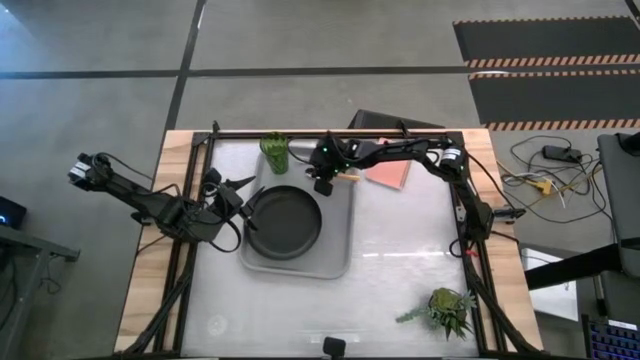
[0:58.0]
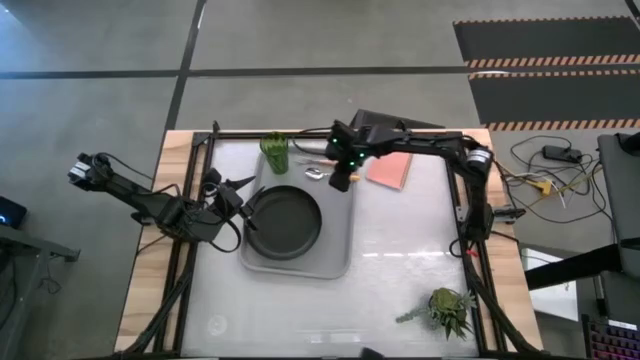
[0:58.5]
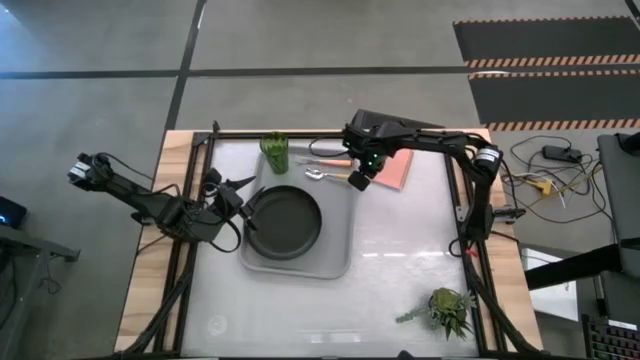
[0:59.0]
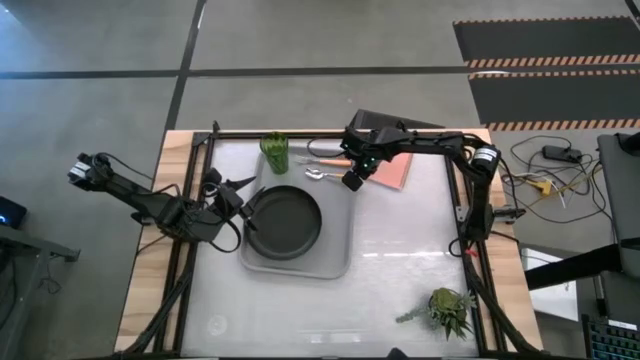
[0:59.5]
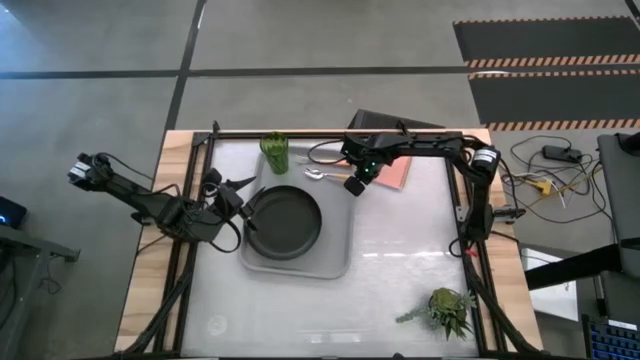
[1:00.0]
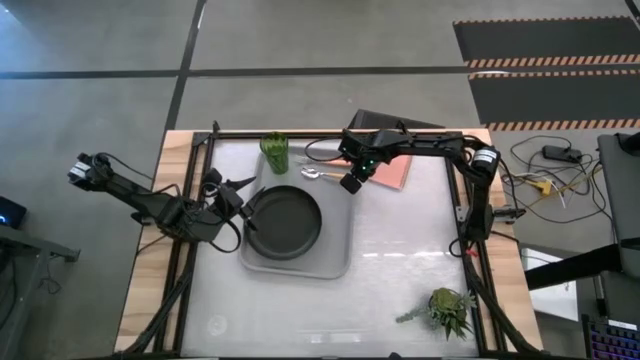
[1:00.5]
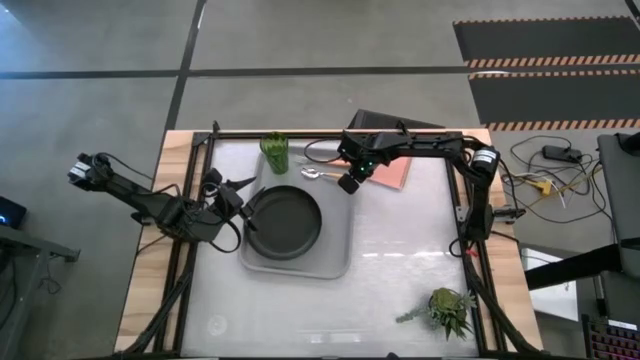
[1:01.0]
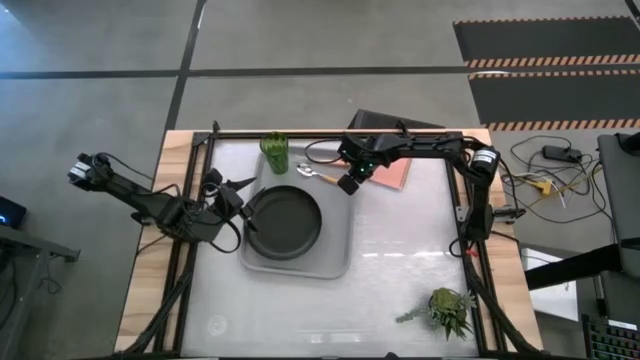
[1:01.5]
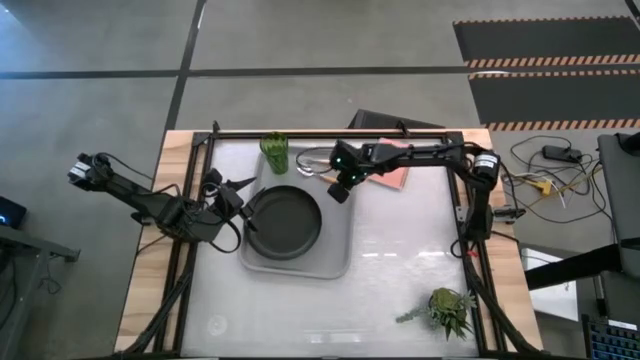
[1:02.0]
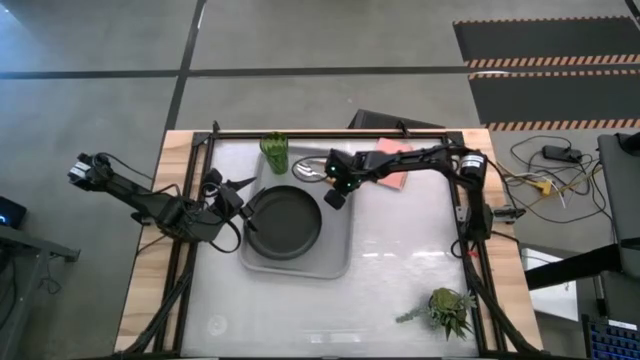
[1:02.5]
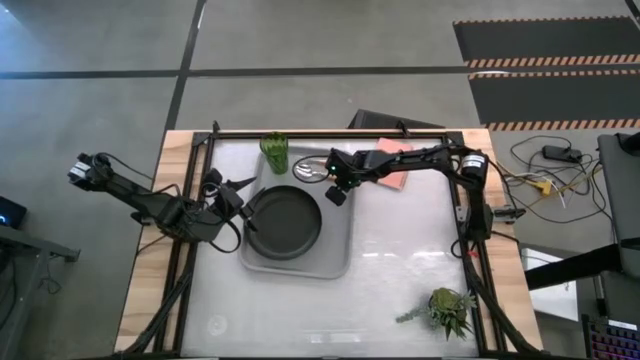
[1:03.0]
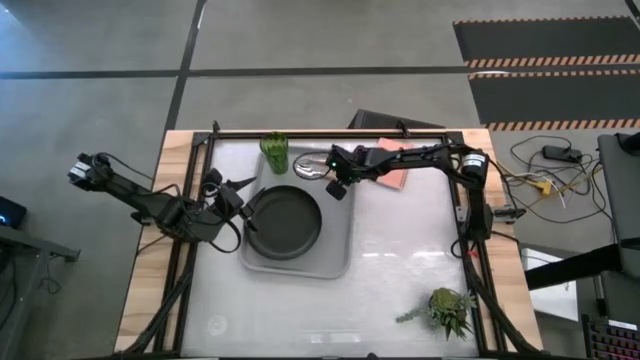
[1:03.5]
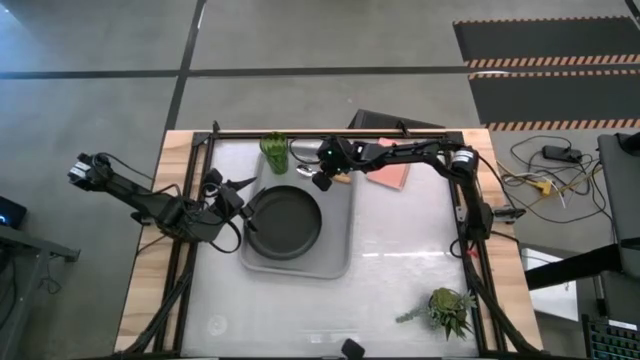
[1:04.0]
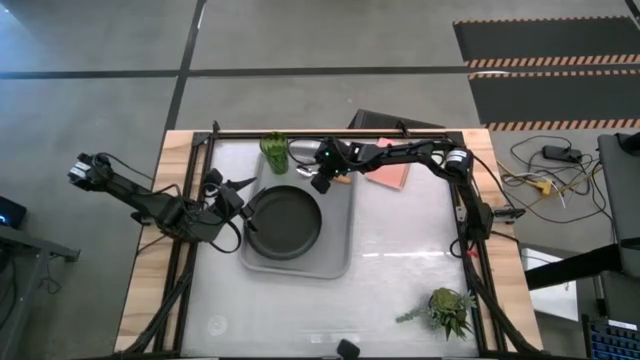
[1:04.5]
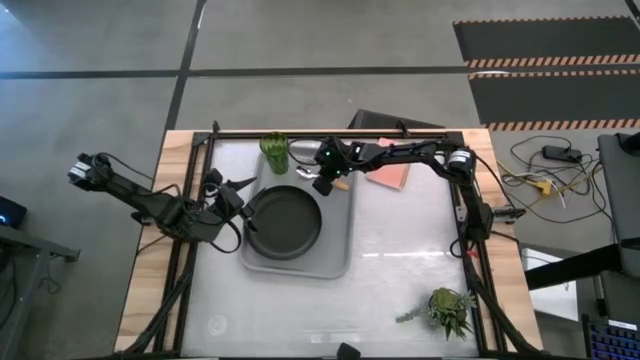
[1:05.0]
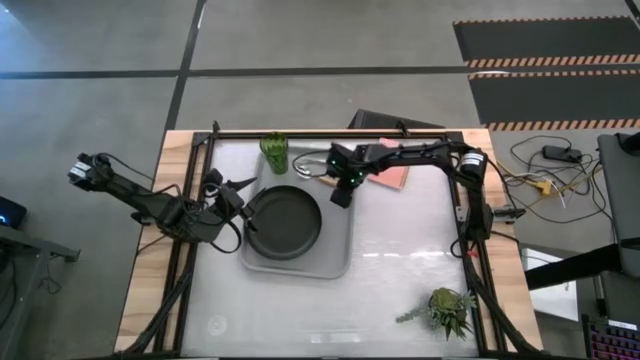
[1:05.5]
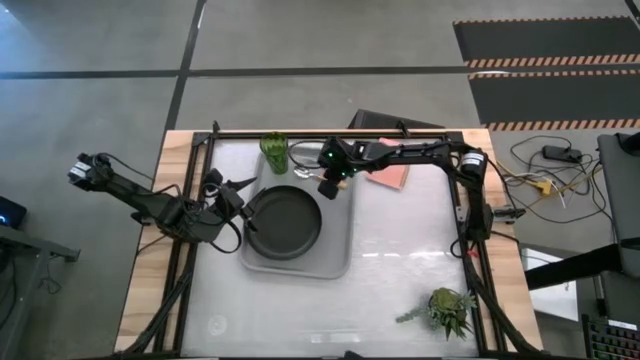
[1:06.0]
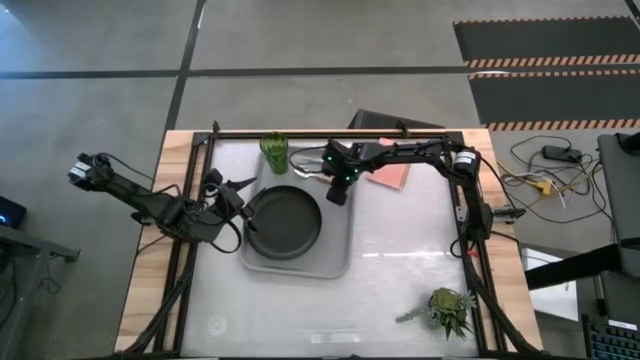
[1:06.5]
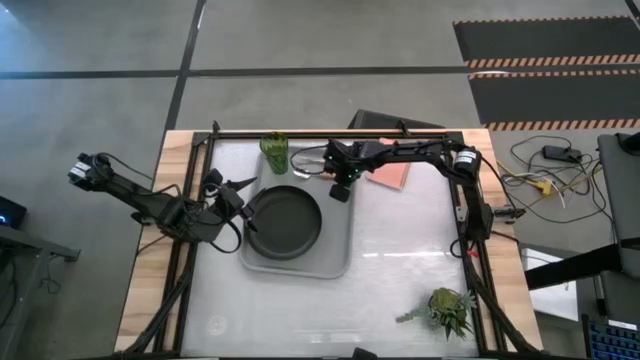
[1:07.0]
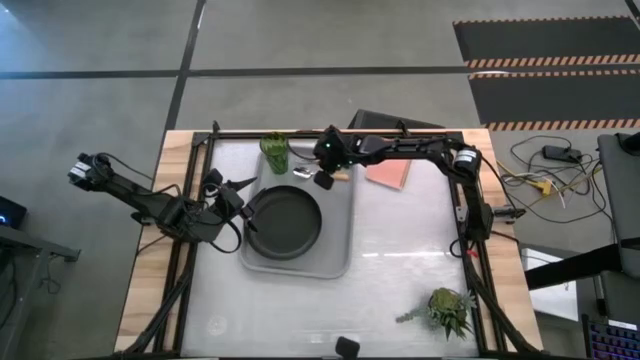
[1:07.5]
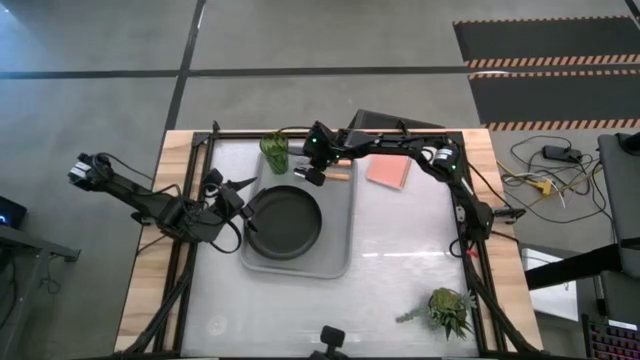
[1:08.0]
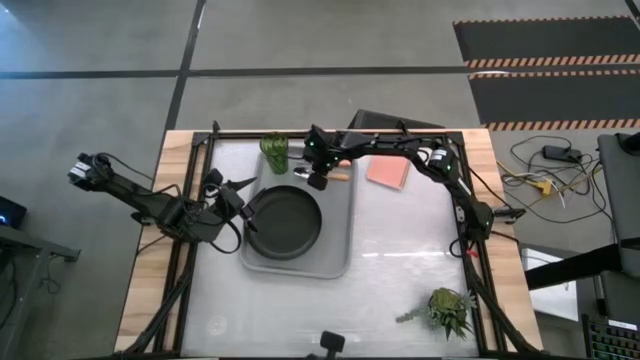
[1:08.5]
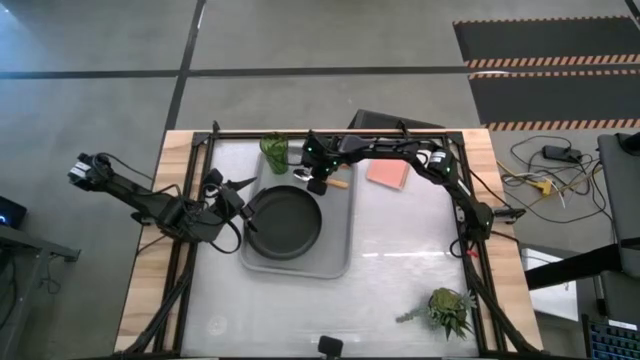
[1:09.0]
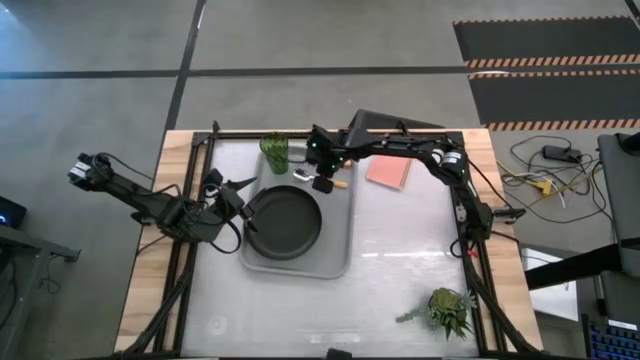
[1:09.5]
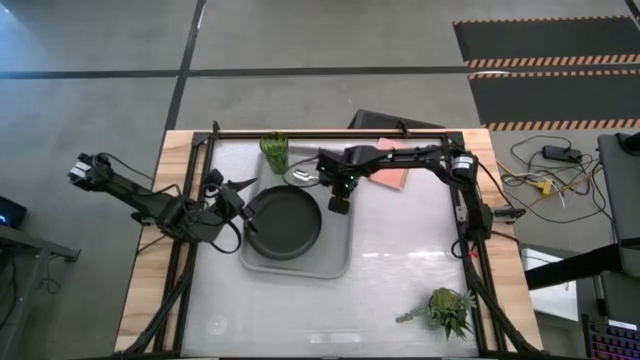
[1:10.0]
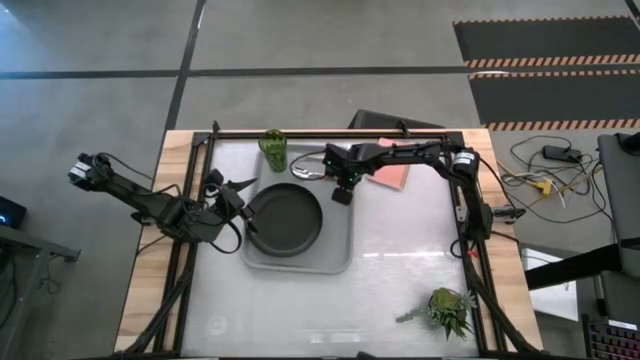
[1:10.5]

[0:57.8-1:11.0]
Task: Pick and place plate/cup/fork/spoon on tray
Put the yellow spoon on the gray serving tray to the left of the yellow fork

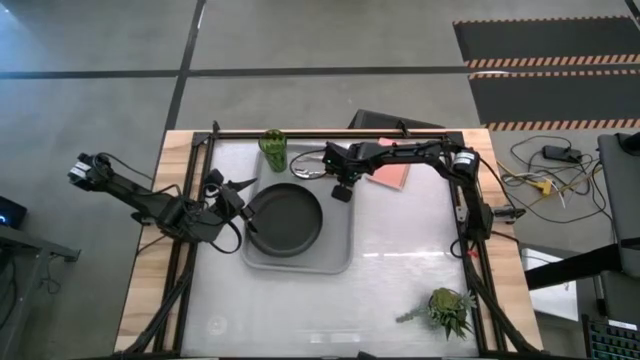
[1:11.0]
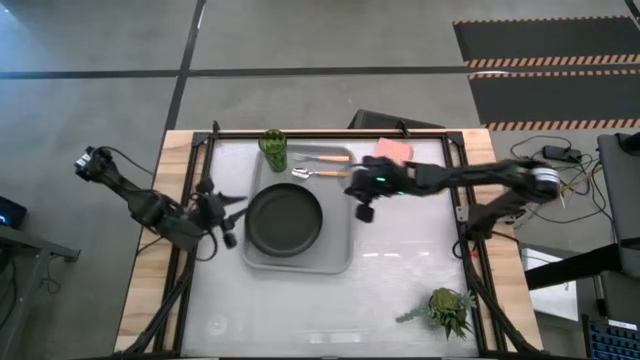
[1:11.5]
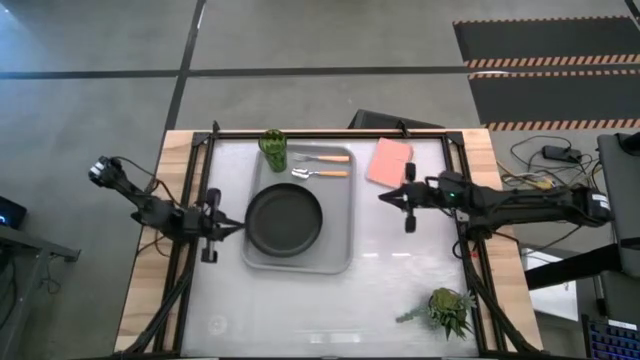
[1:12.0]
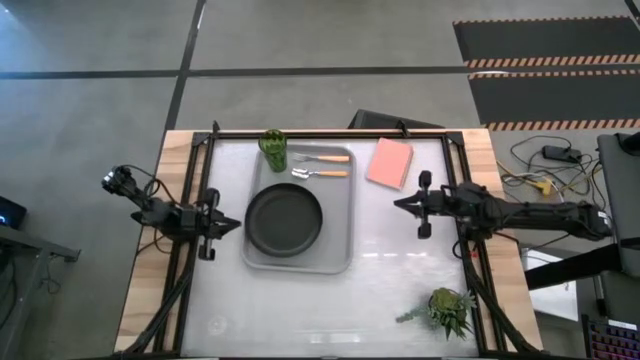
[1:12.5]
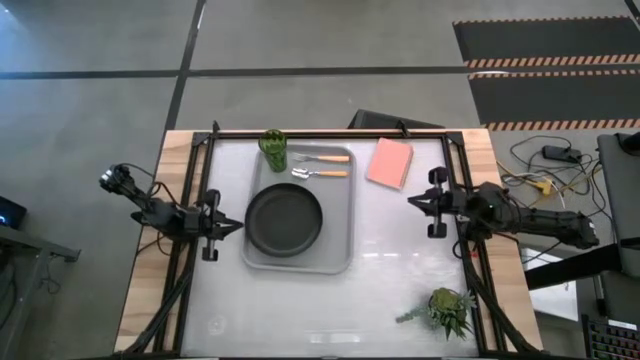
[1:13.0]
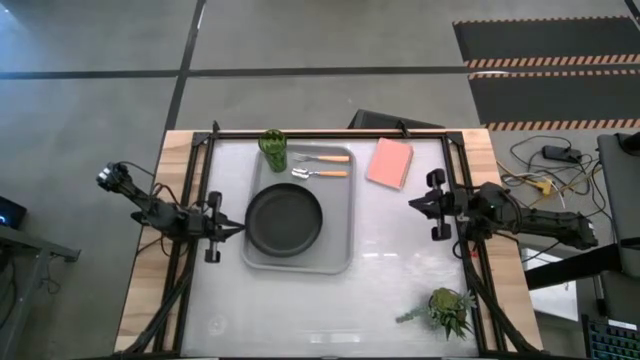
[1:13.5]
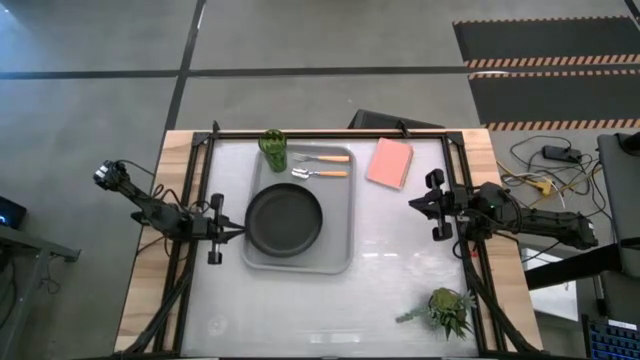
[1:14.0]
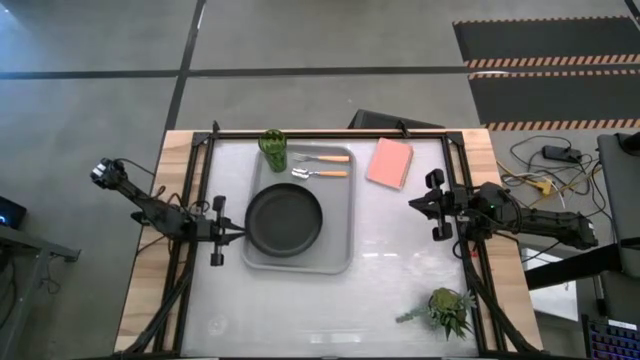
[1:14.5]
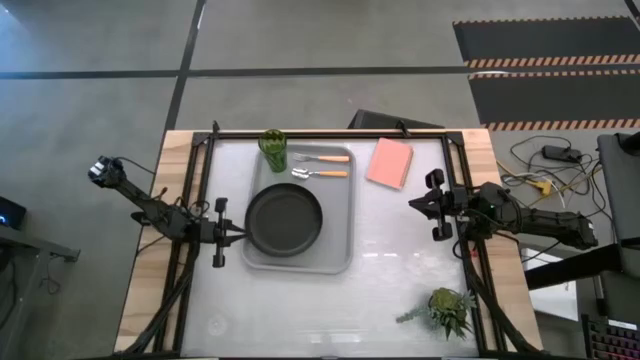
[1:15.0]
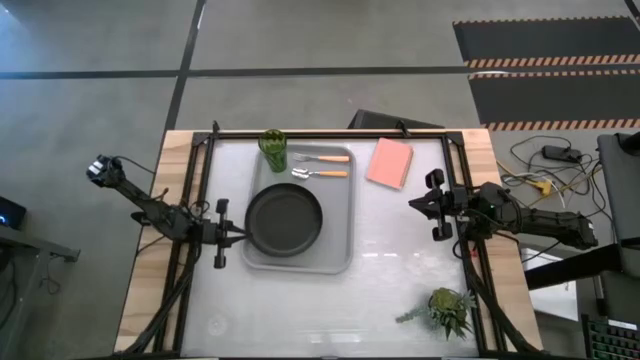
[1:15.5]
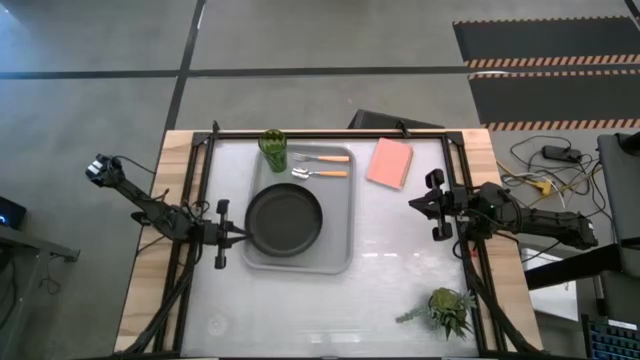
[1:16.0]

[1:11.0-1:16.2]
Return to Home Position

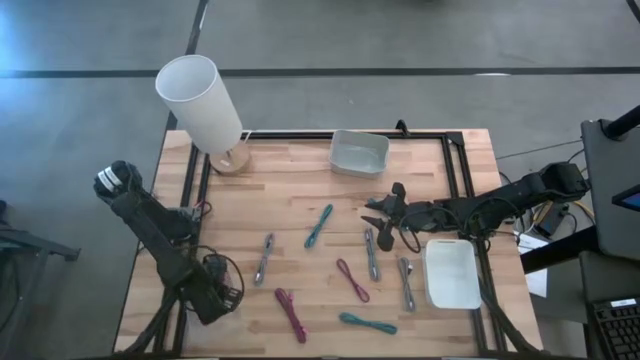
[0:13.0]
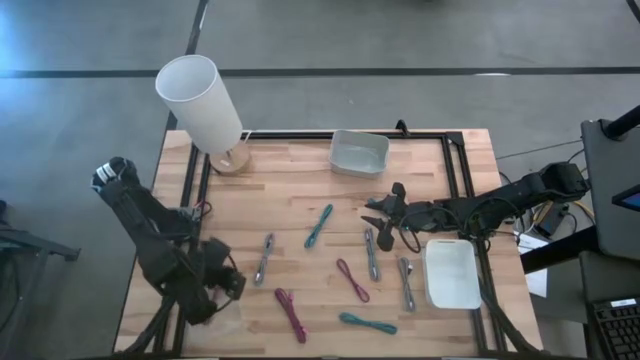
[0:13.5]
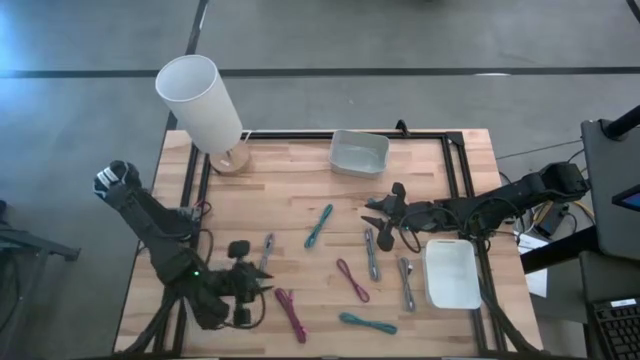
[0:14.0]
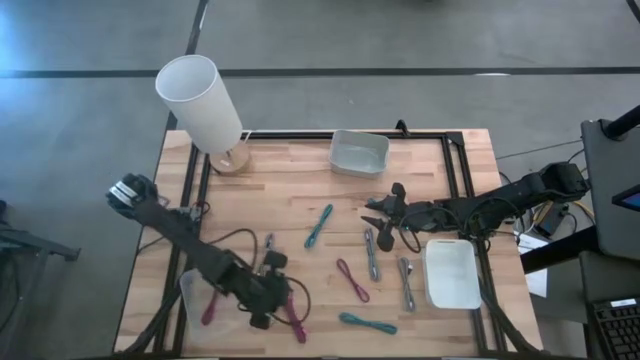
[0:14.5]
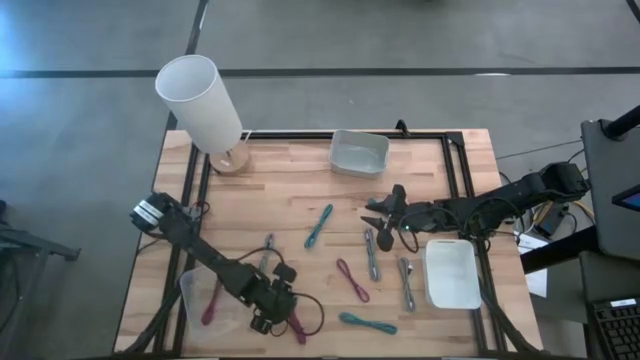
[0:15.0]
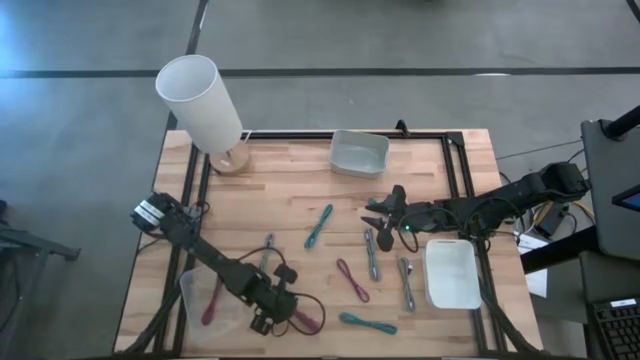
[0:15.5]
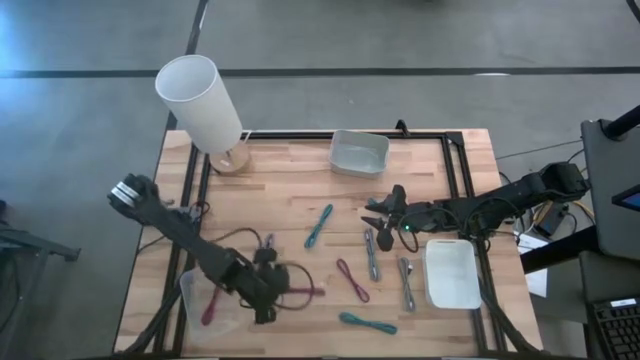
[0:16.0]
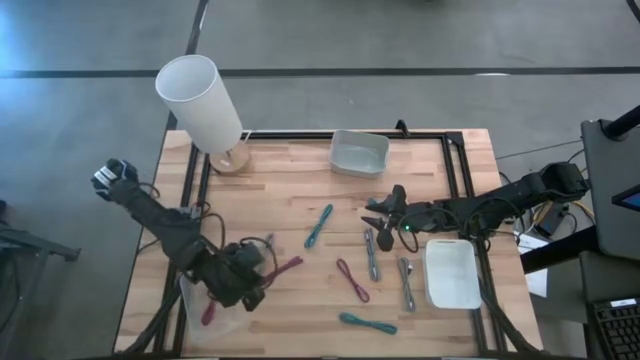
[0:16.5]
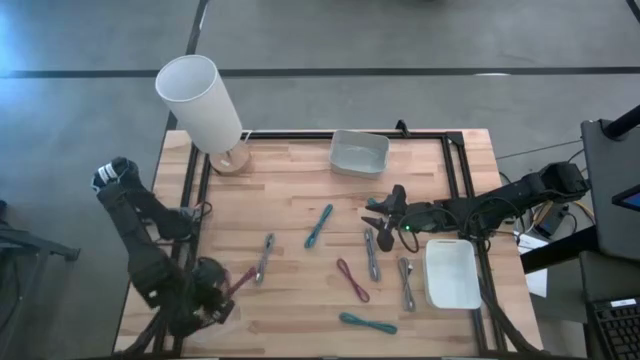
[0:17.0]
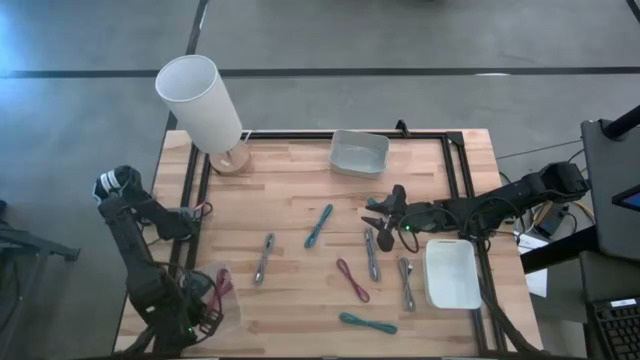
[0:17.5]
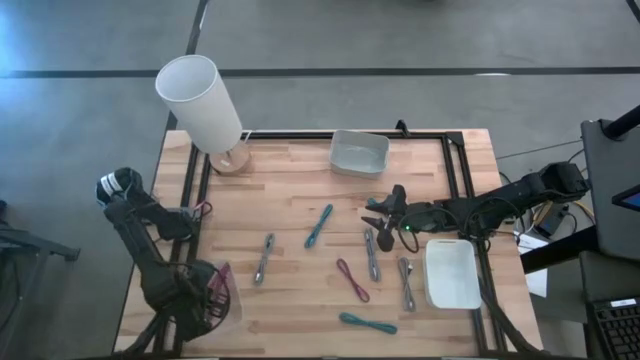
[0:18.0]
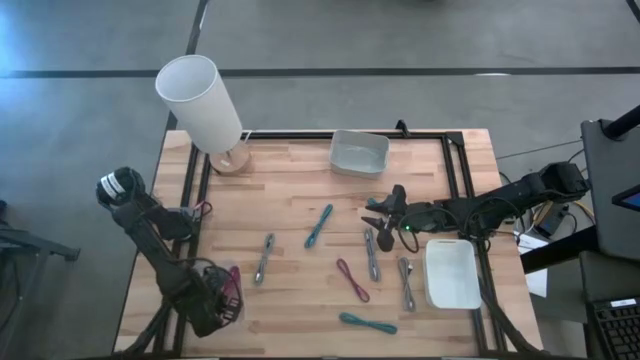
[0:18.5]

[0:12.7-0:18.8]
Task: Pick & Place USB Port
Put the left pink striped charger cable into the transparent bin
